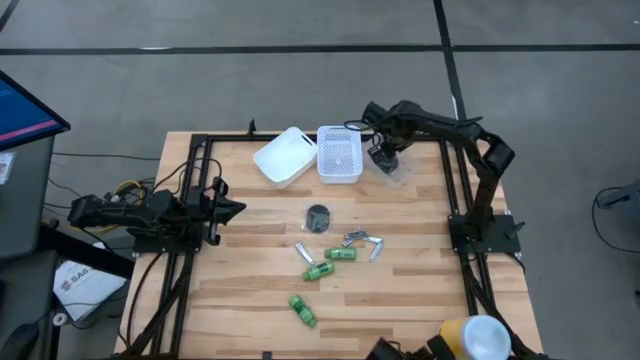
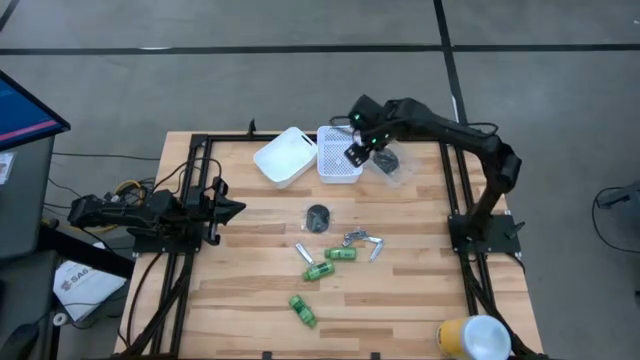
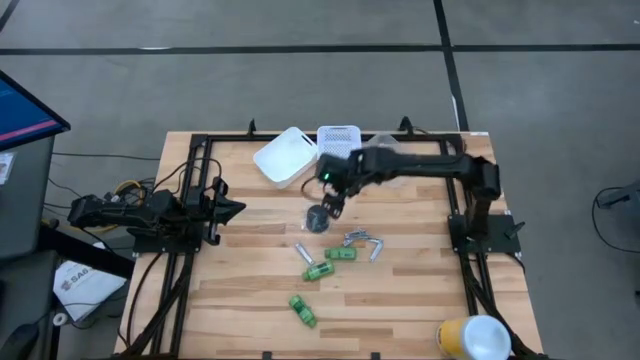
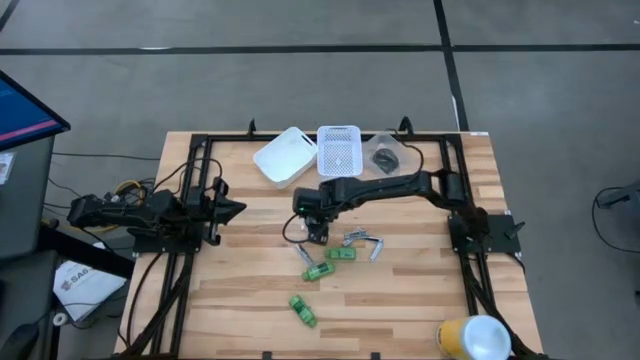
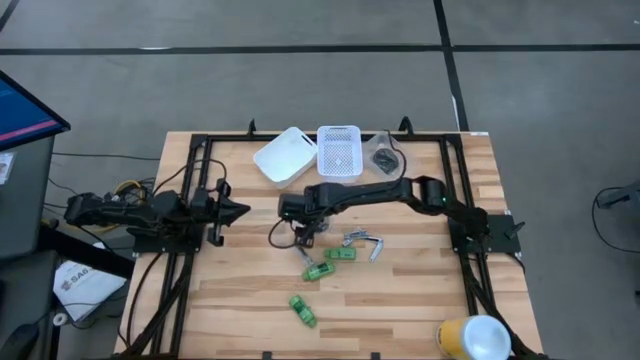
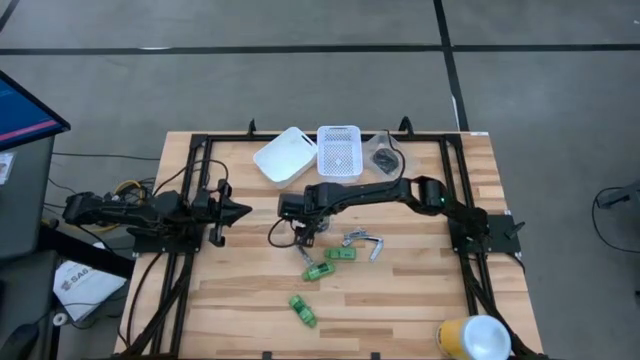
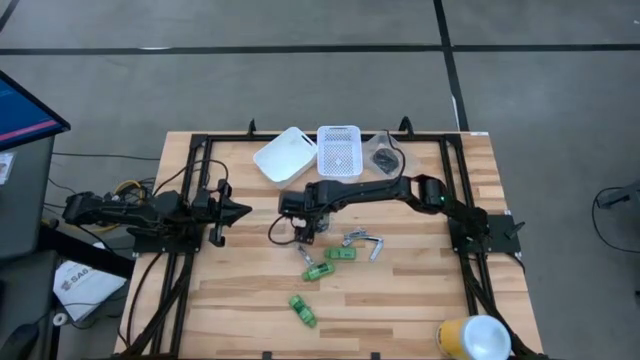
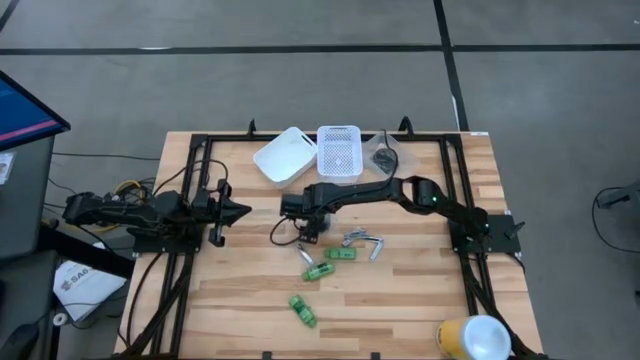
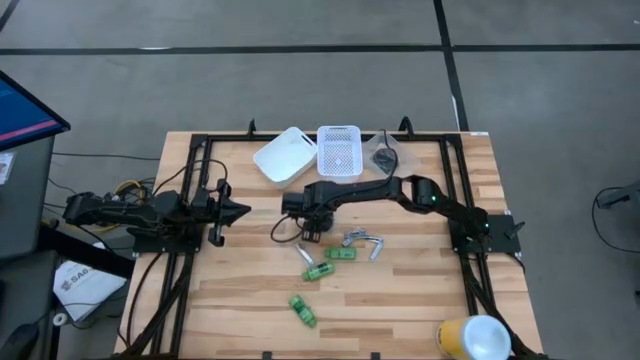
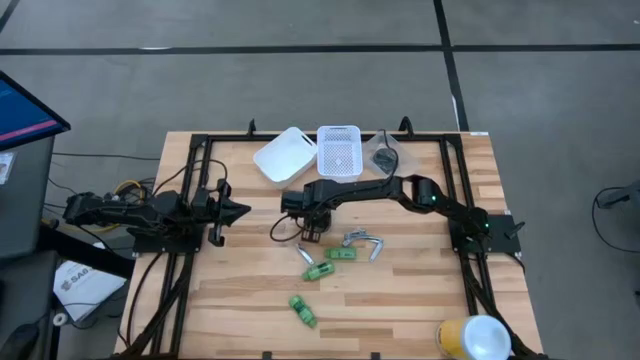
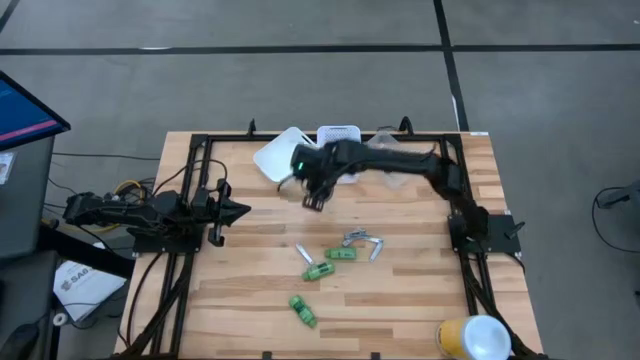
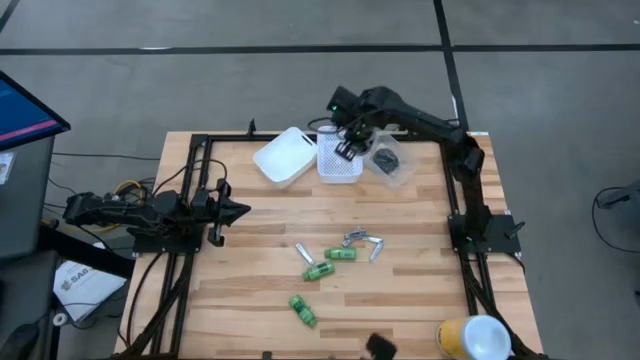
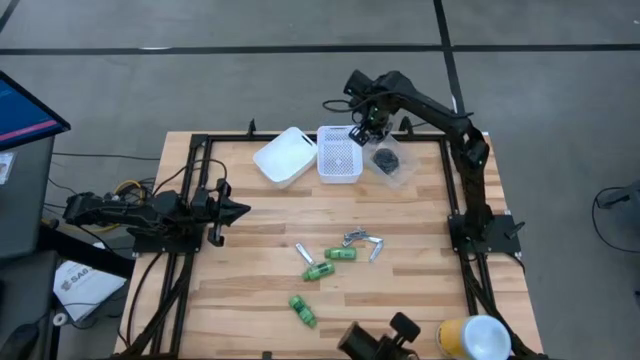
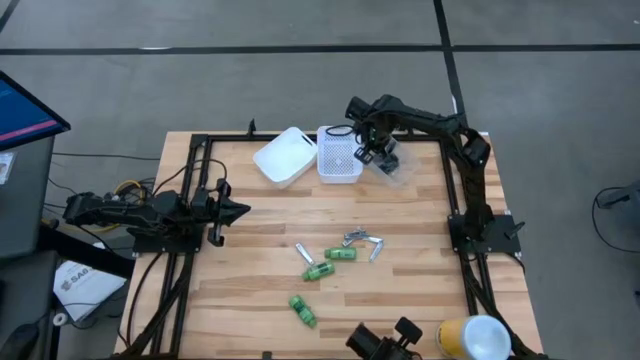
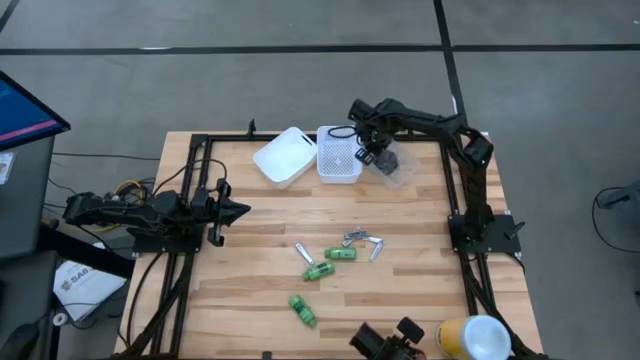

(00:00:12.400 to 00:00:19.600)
Task: Pick & Place Travel size toiletries
Put the black hairbrush into the transparent bin

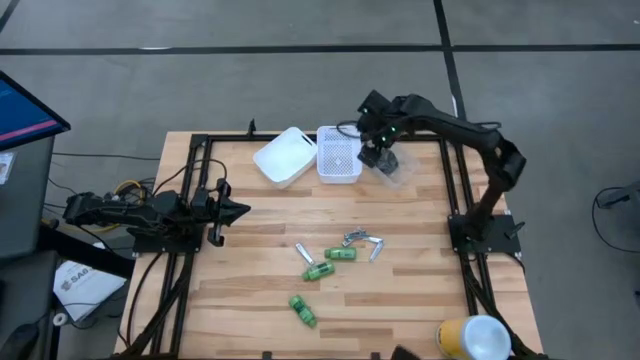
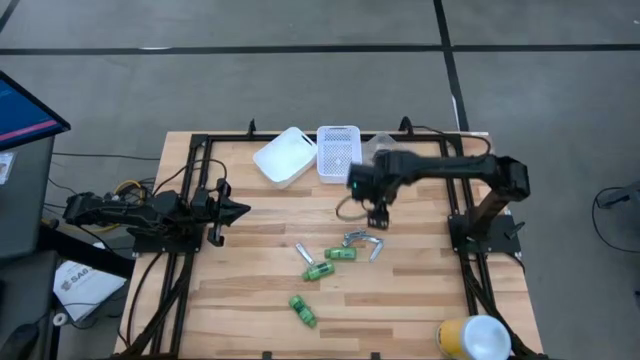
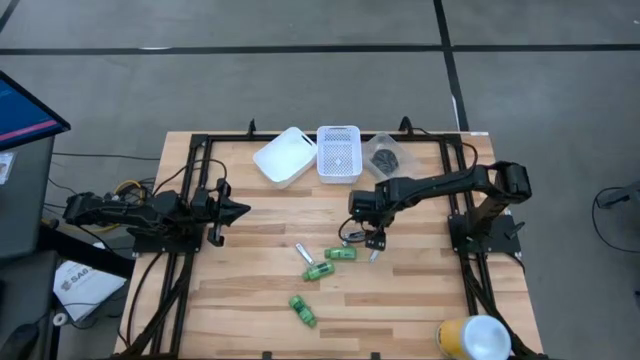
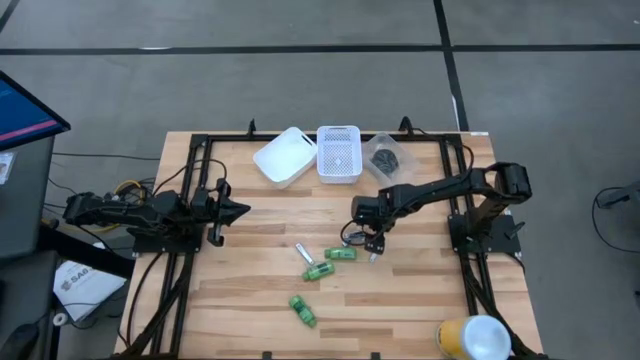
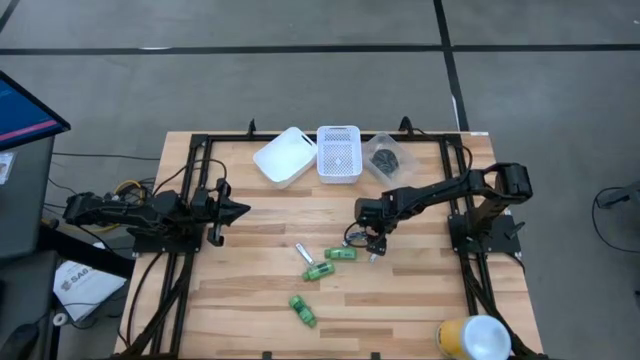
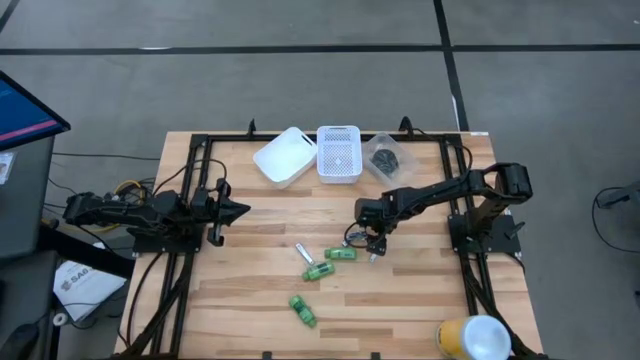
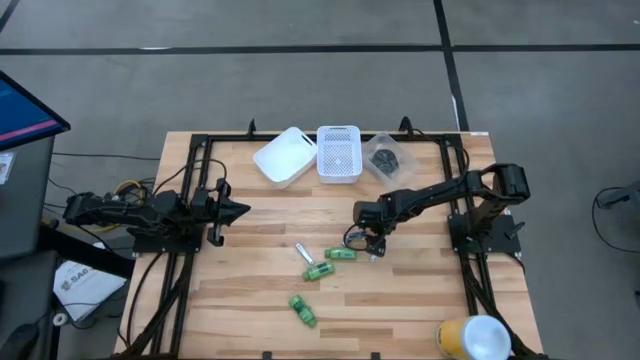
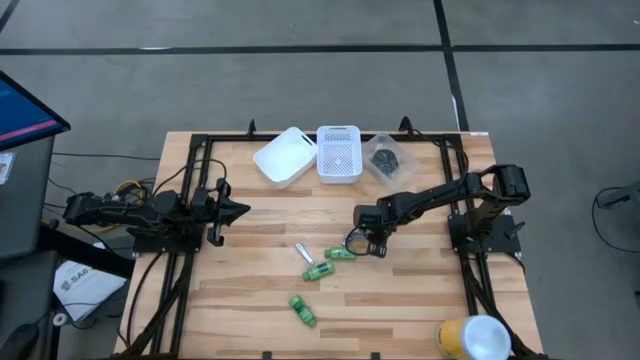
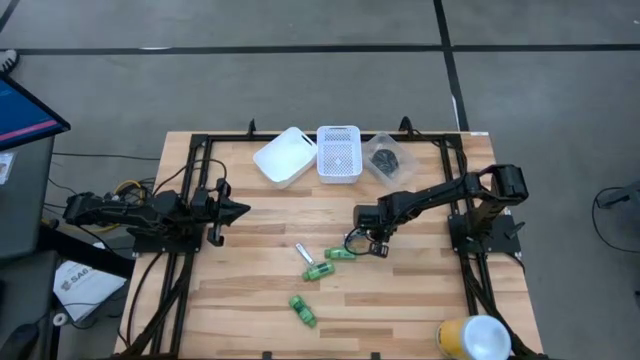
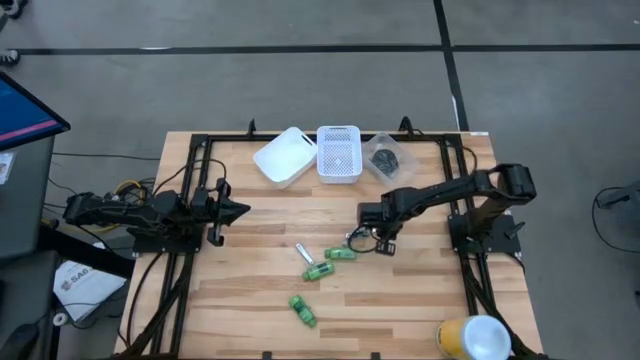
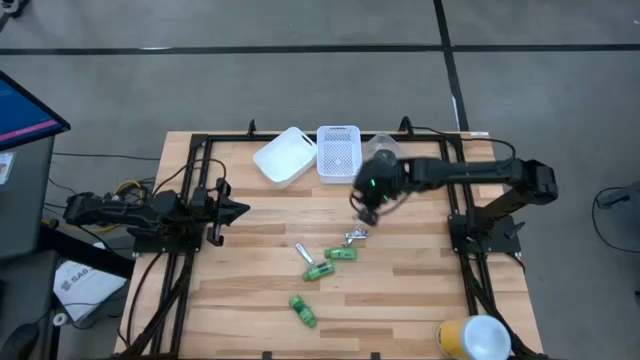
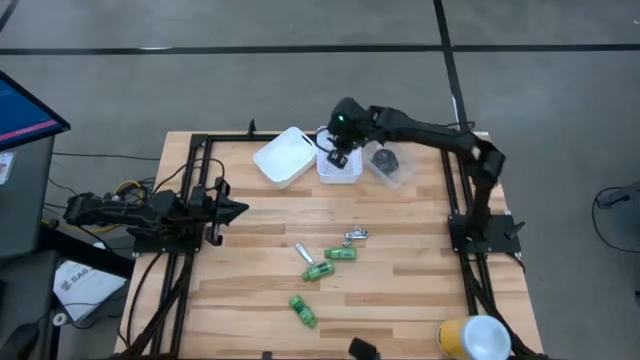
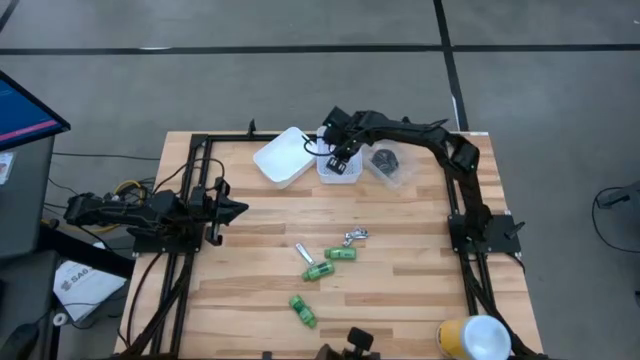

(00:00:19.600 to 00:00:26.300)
Put the silver nail cutter into the right white bin

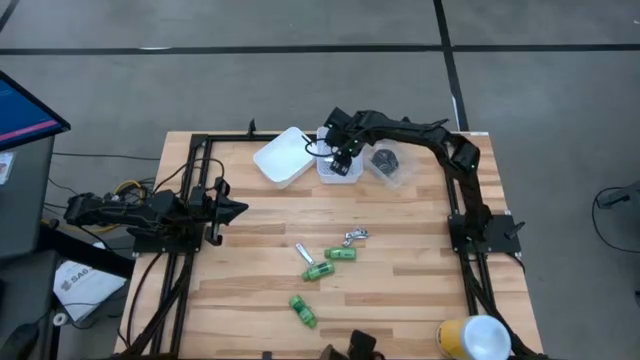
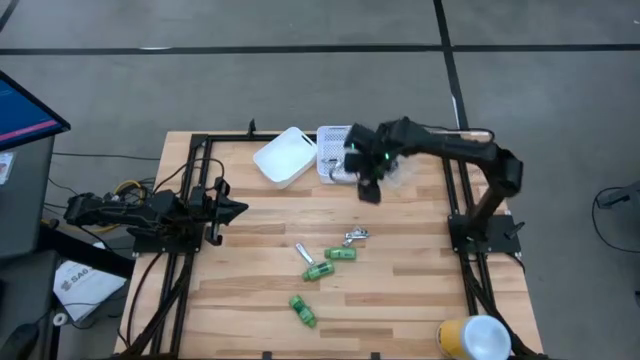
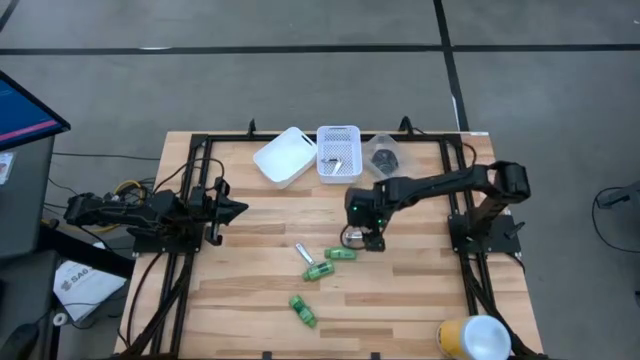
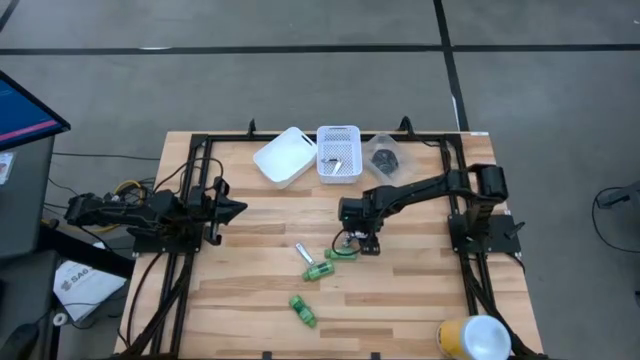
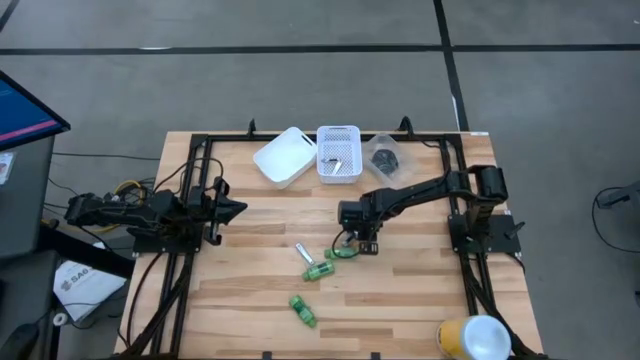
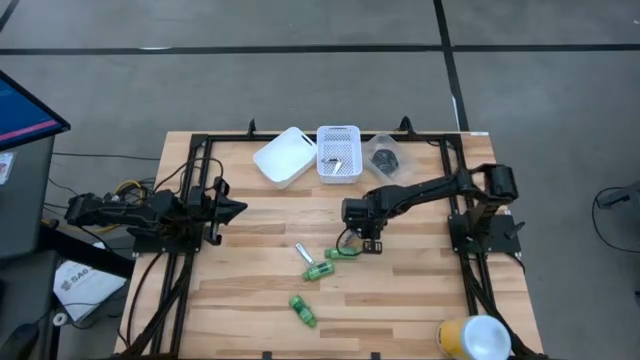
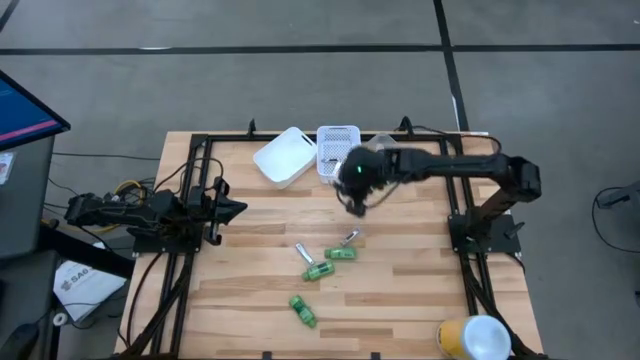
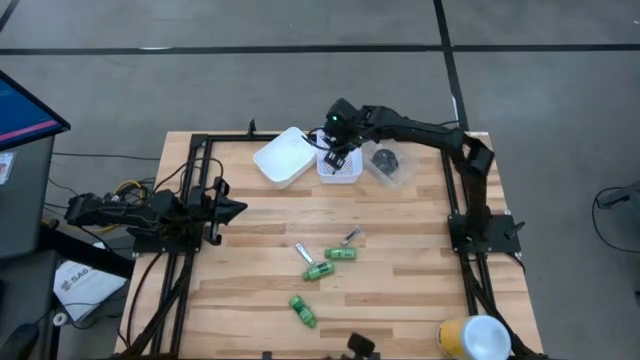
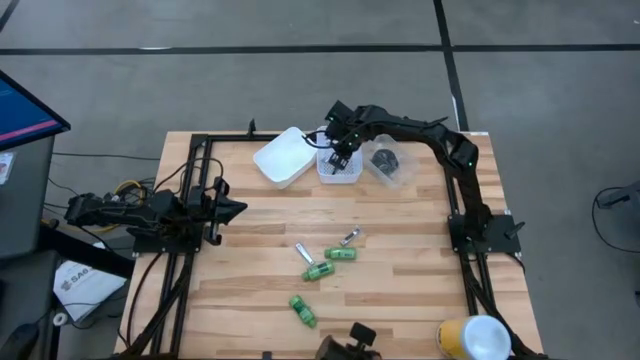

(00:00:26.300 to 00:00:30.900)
Put the silver nail cutter into the right white bin

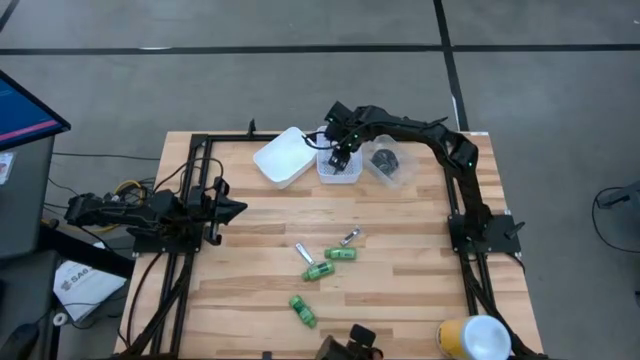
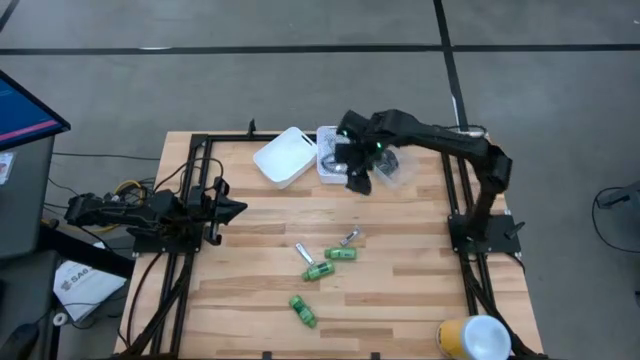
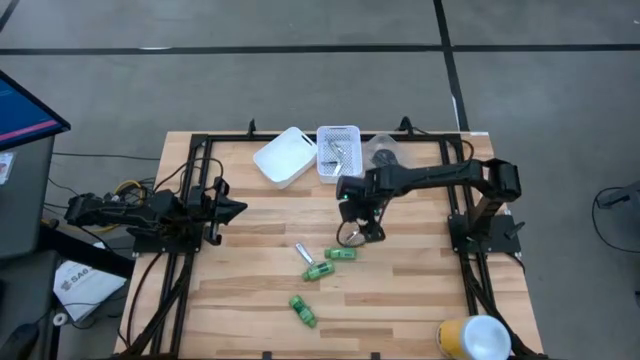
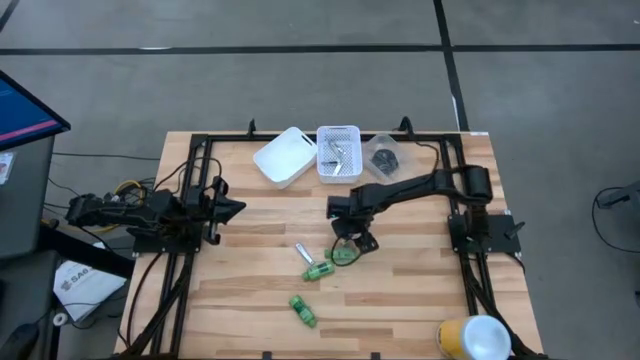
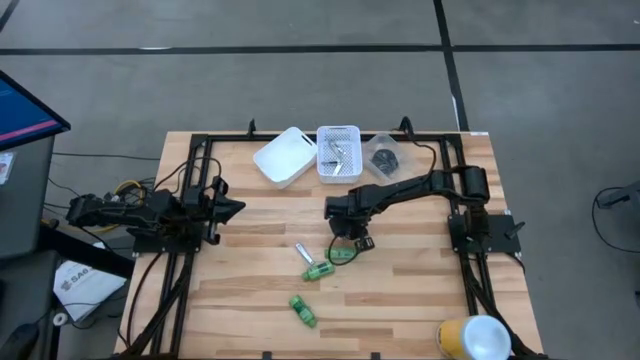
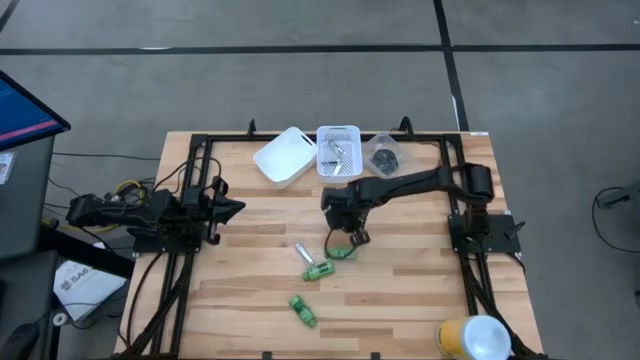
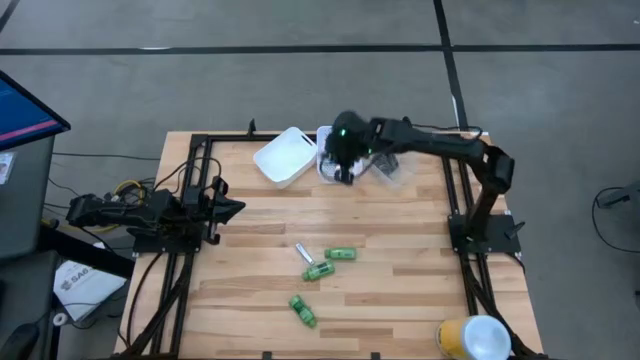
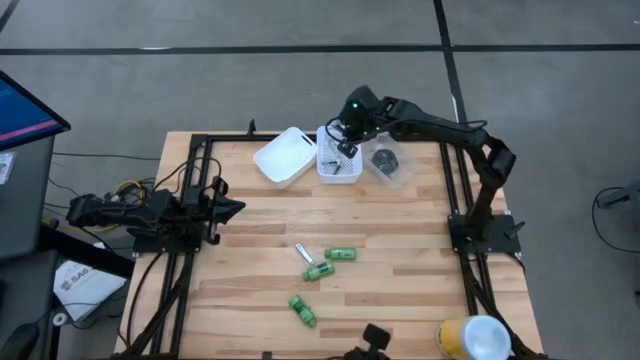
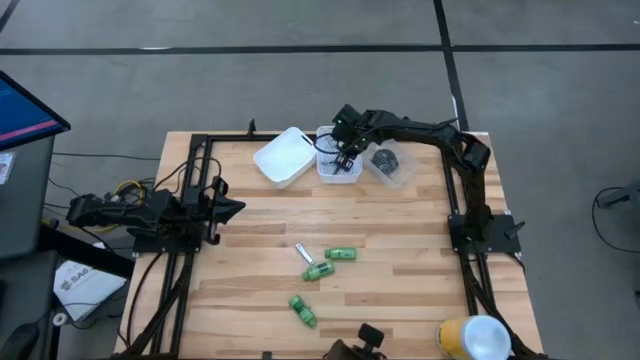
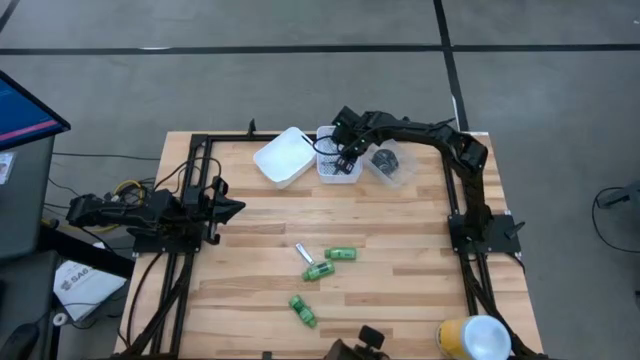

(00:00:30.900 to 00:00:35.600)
Put the silver nail cutter into the right white bin
